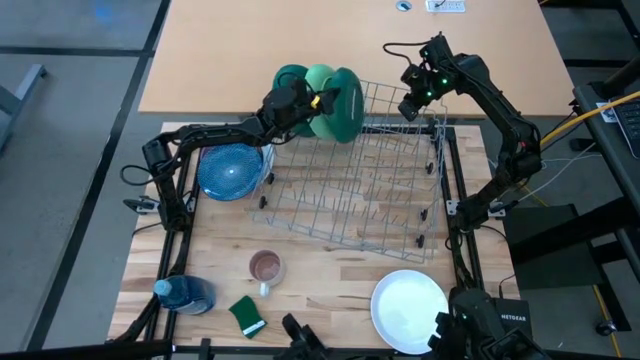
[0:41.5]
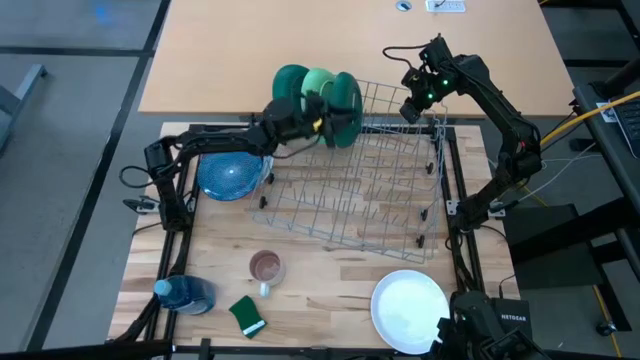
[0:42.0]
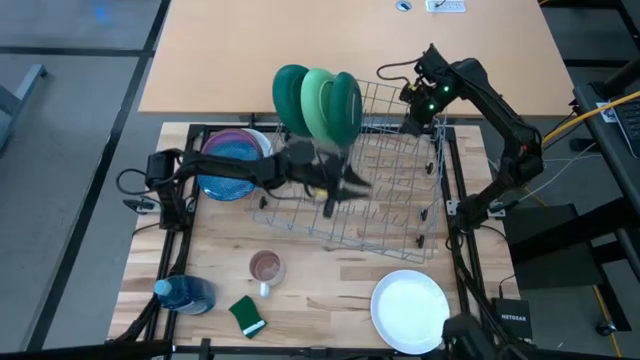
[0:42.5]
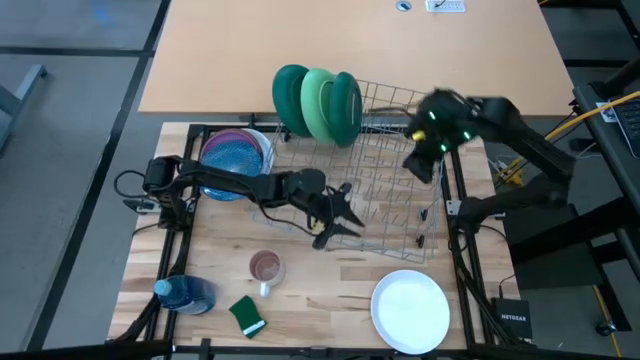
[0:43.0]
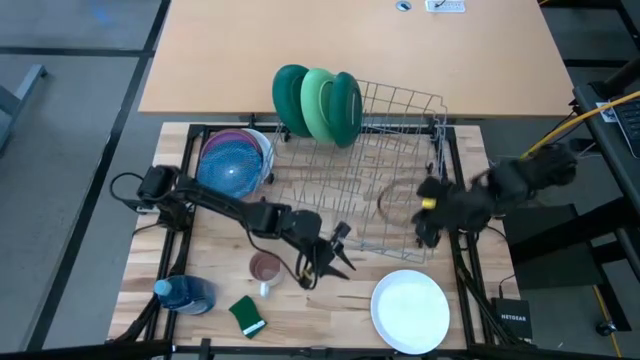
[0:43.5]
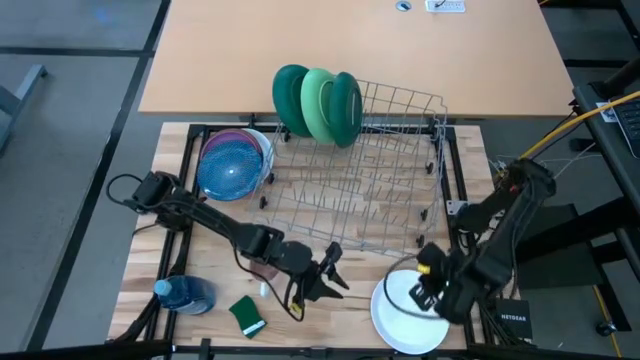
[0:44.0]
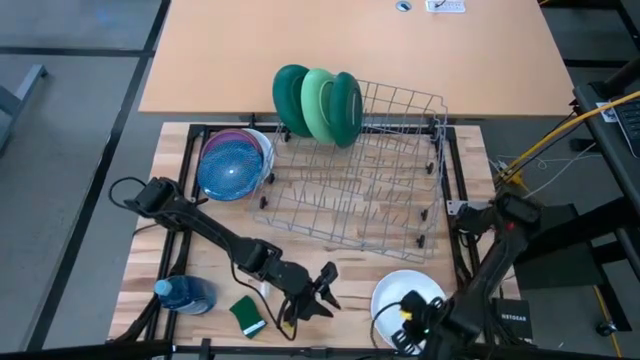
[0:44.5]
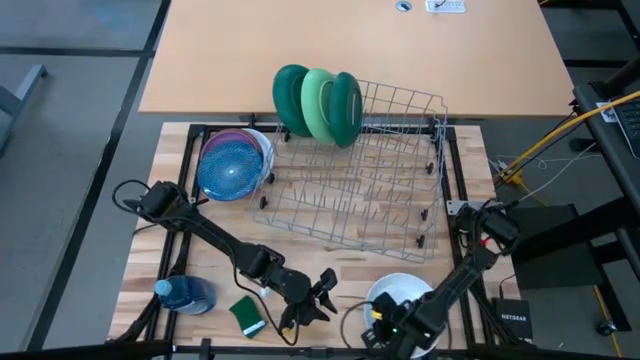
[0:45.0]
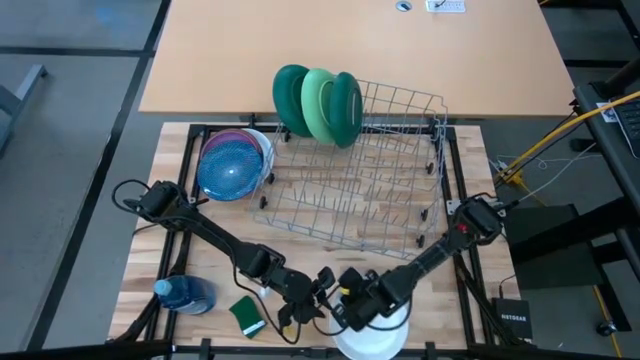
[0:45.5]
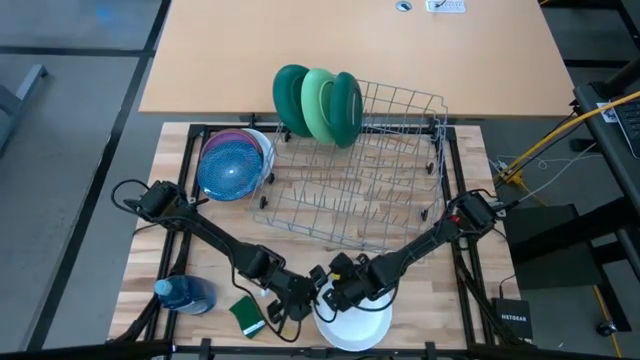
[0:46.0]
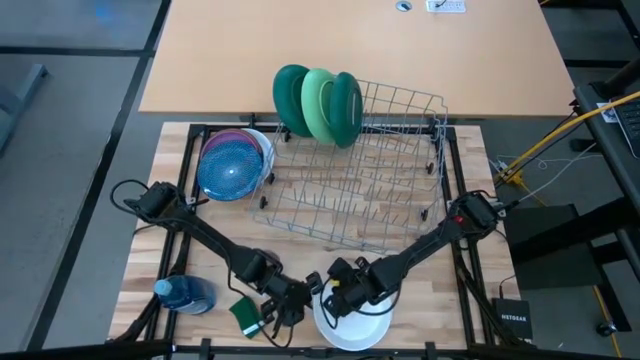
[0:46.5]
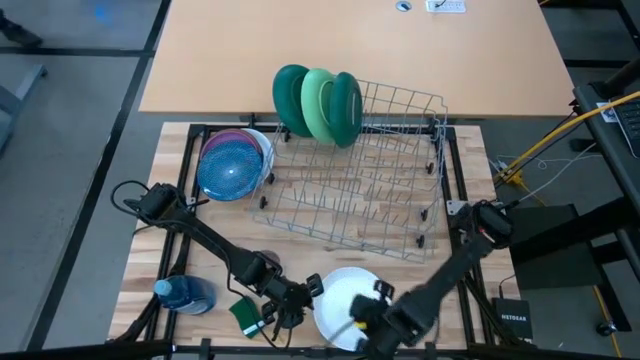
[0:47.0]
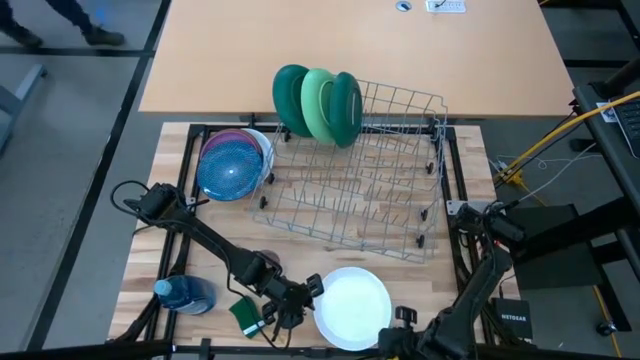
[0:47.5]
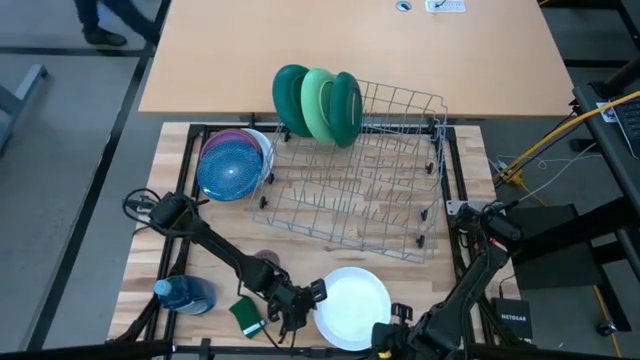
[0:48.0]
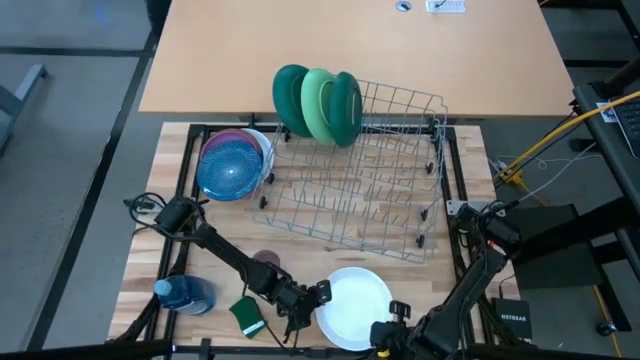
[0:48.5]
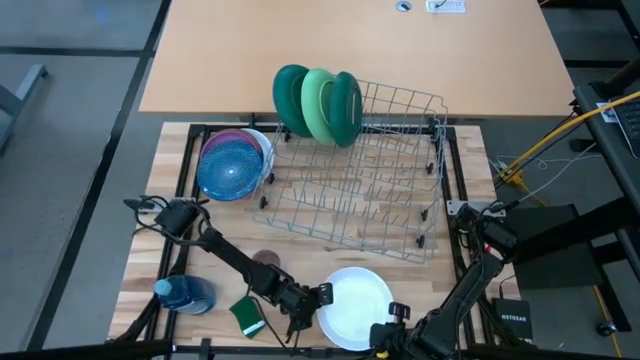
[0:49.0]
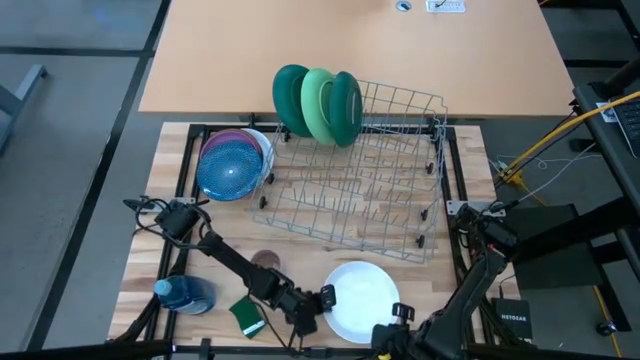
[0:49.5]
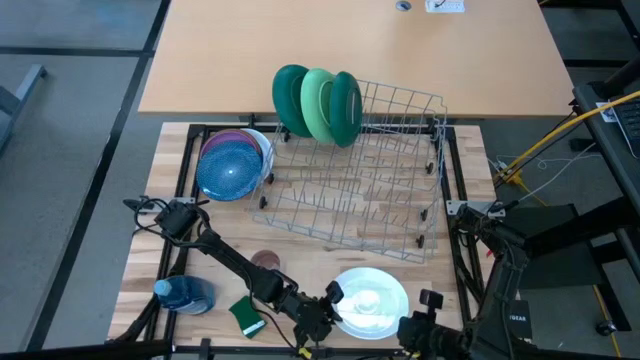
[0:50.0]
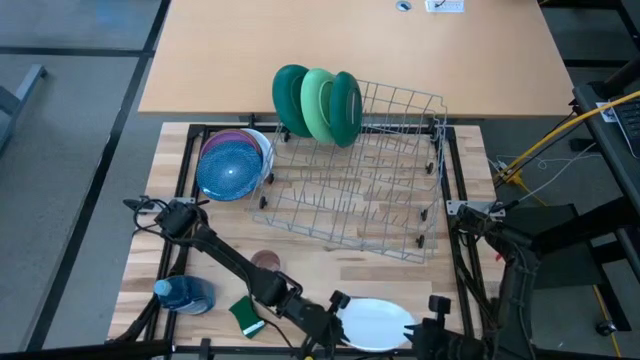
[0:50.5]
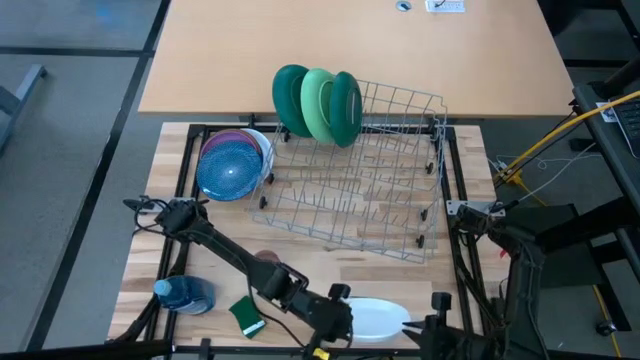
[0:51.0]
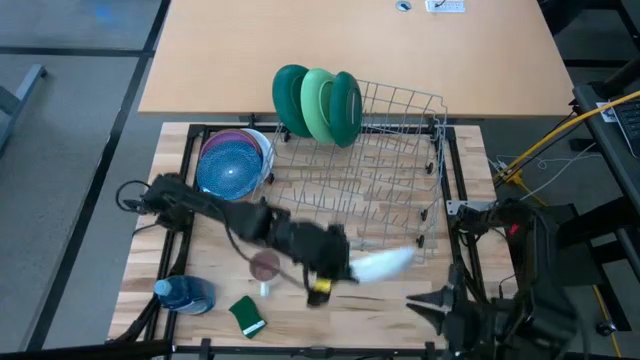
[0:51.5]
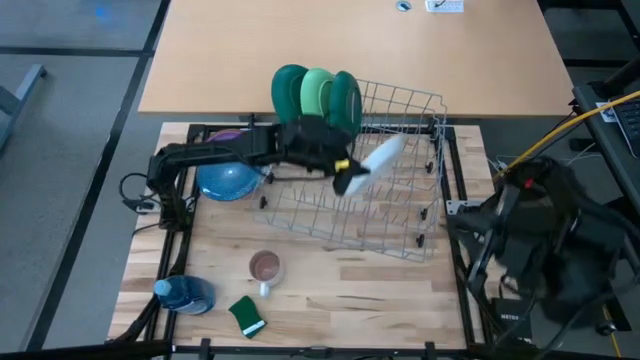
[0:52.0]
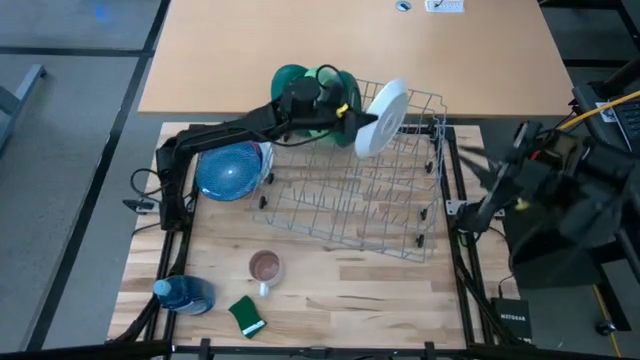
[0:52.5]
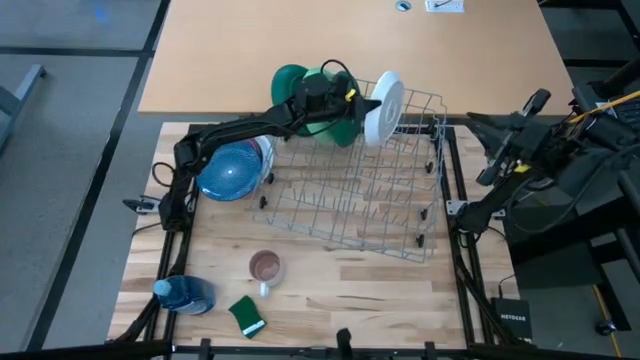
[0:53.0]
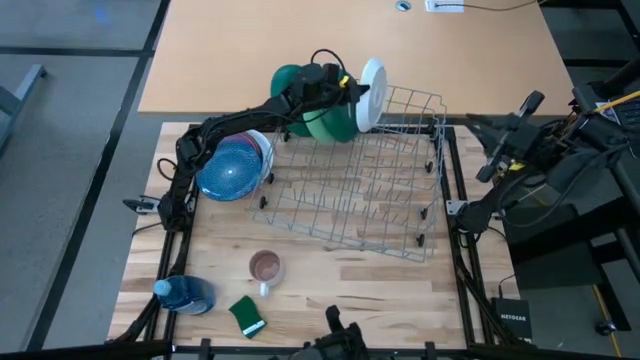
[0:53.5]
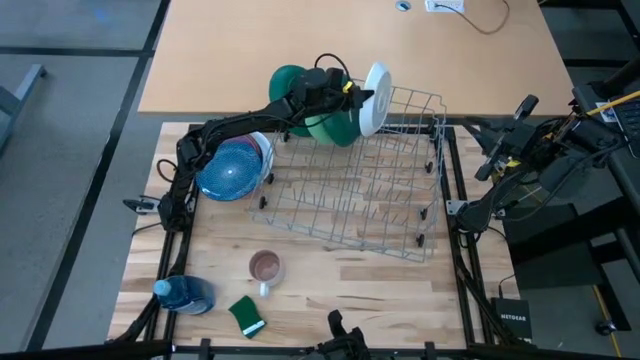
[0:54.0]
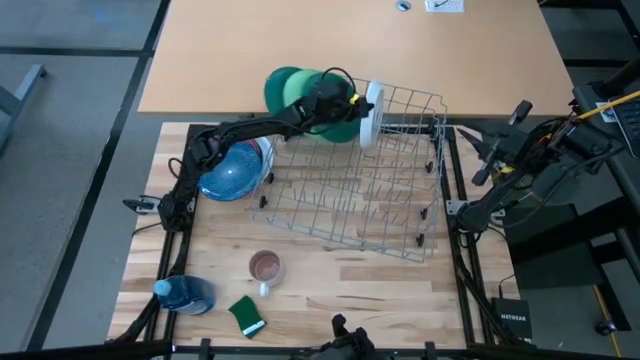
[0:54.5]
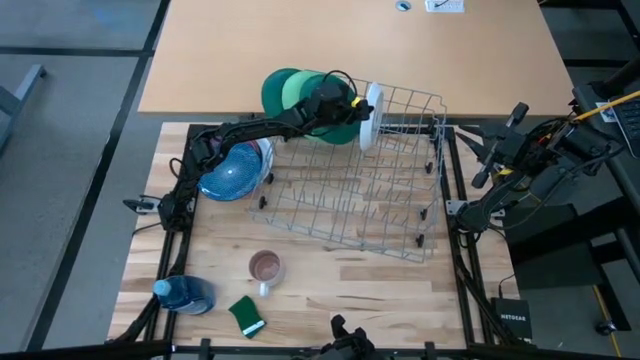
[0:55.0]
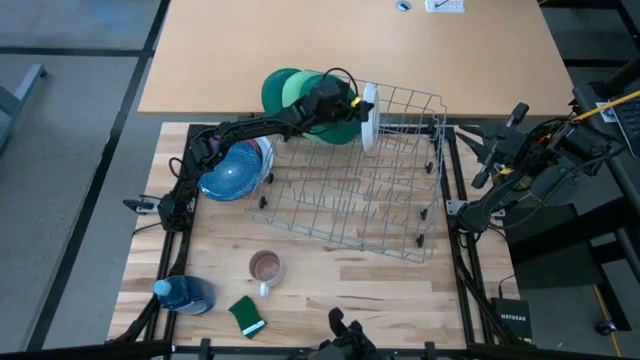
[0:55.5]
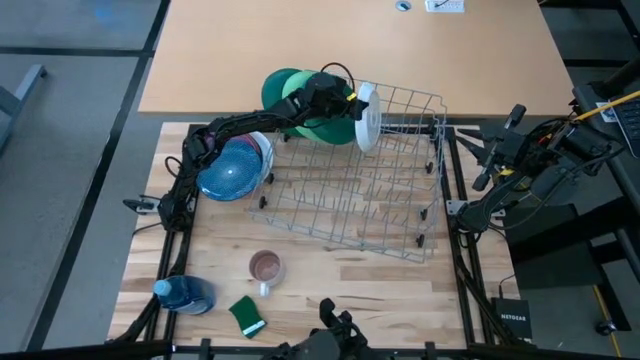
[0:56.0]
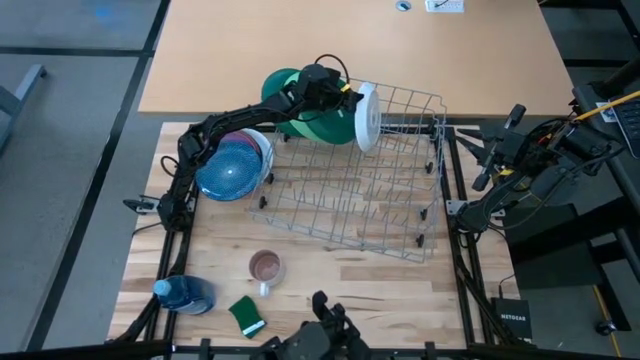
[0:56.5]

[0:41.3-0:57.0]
Task: Sort dishes
Put the bottom white plate into the dishwasher rack

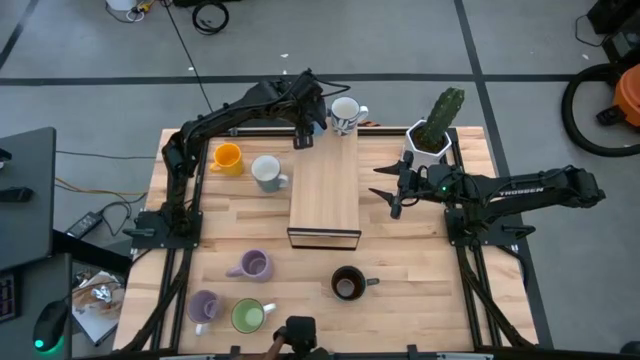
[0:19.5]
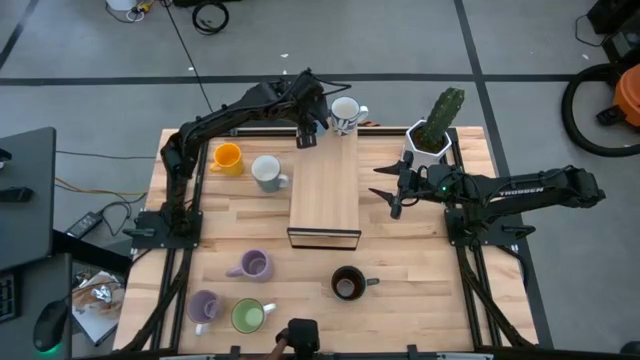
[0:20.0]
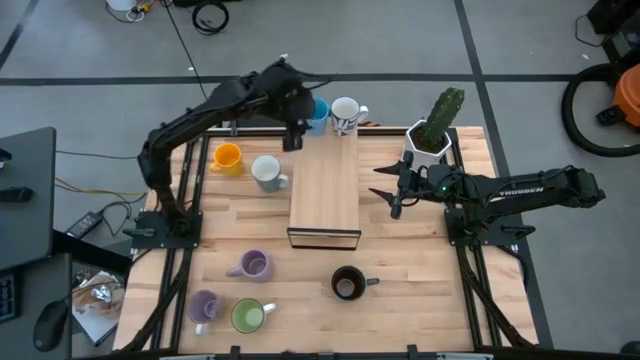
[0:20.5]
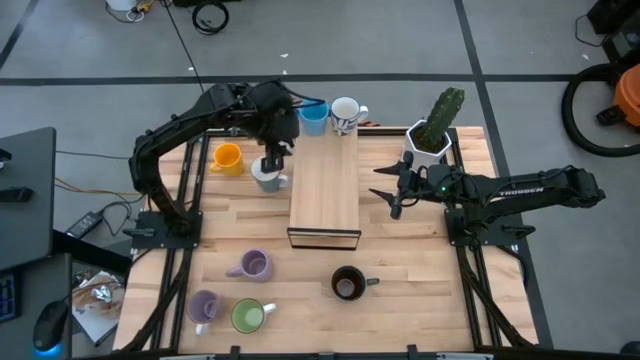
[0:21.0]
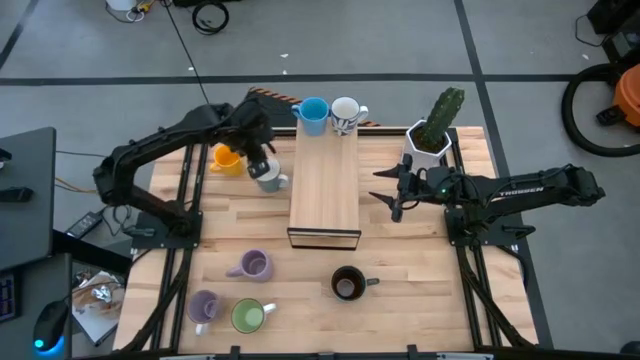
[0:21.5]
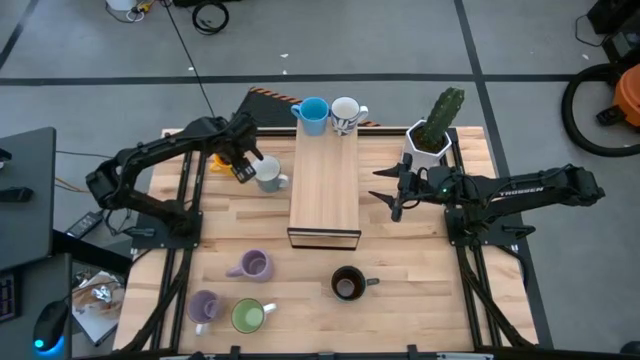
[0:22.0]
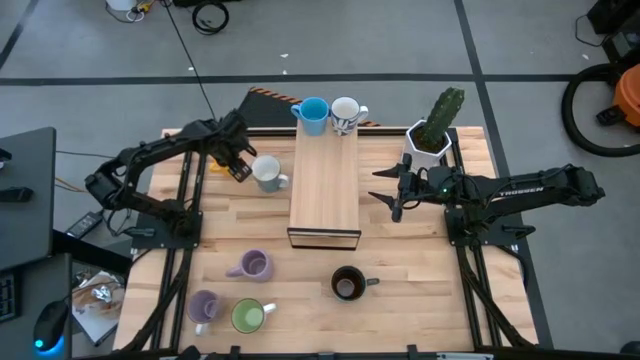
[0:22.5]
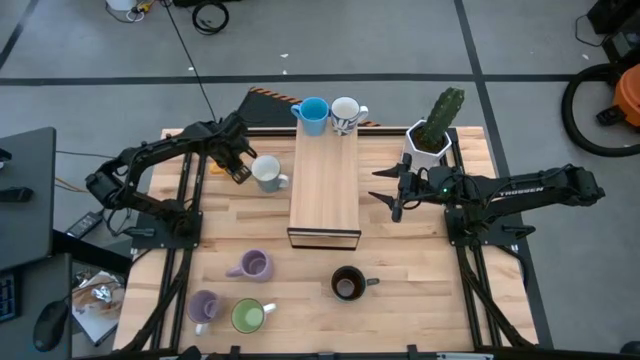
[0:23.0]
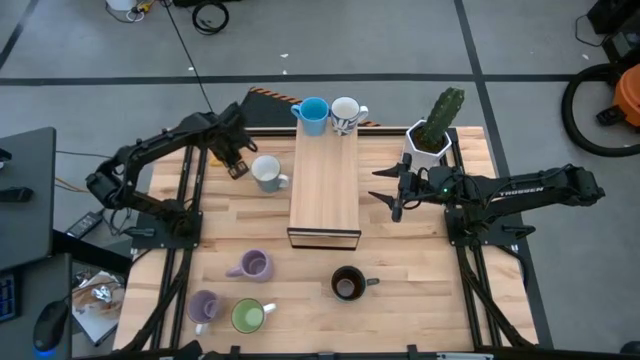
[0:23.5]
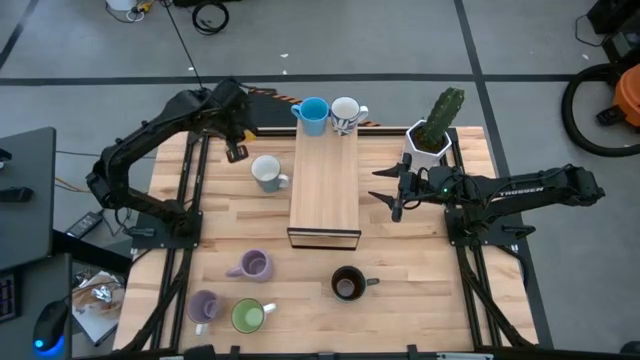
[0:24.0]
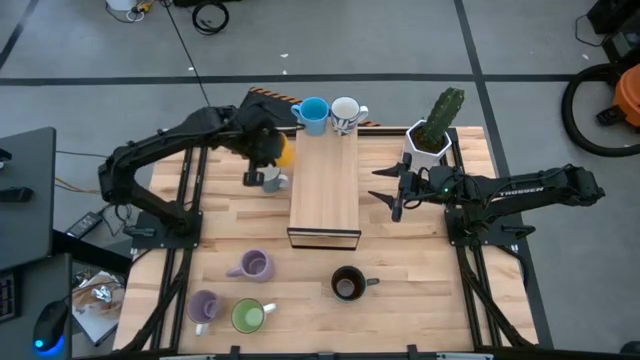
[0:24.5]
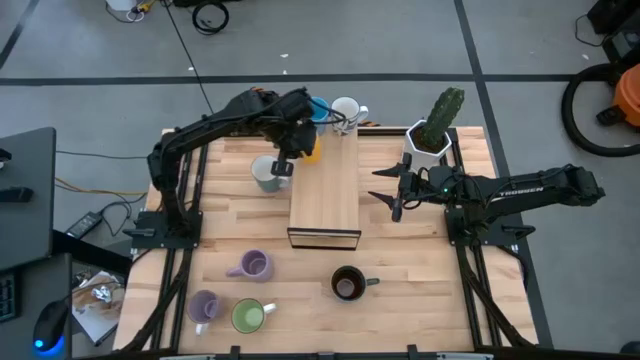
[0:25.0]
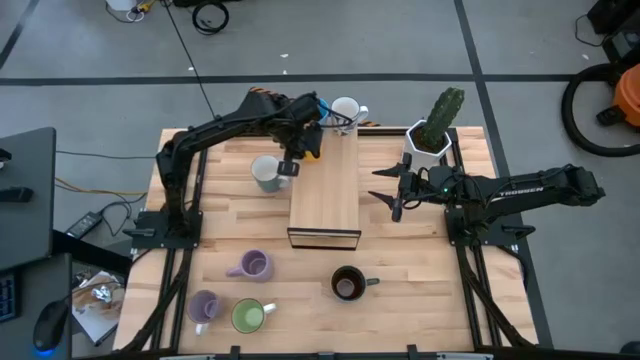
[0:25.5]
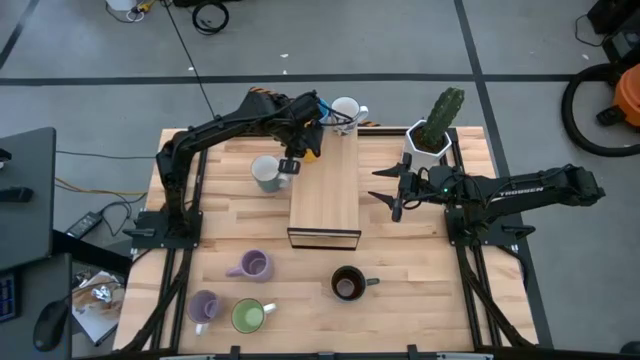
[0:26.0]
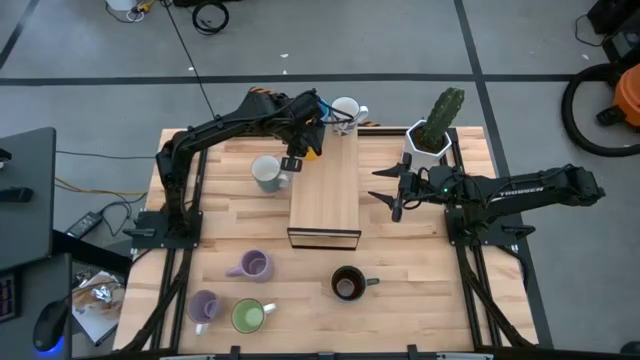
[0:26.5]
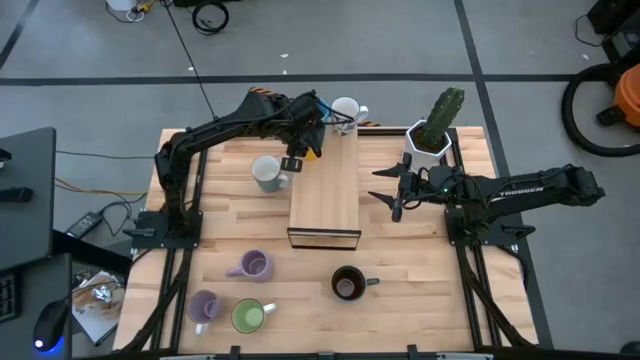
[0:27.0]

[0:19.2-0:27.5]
Task: Place coffee mugs
Put the yellow mug on the shelf
